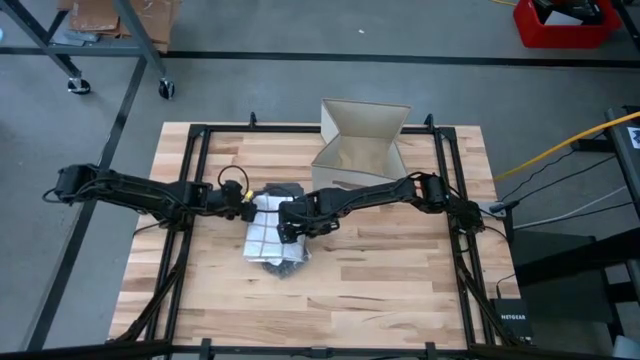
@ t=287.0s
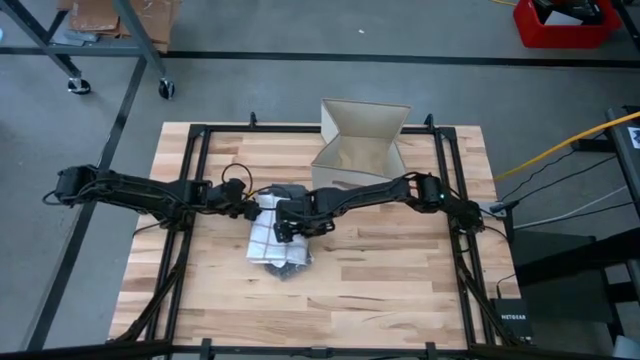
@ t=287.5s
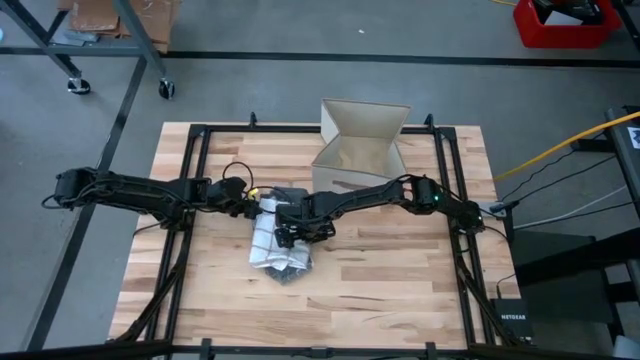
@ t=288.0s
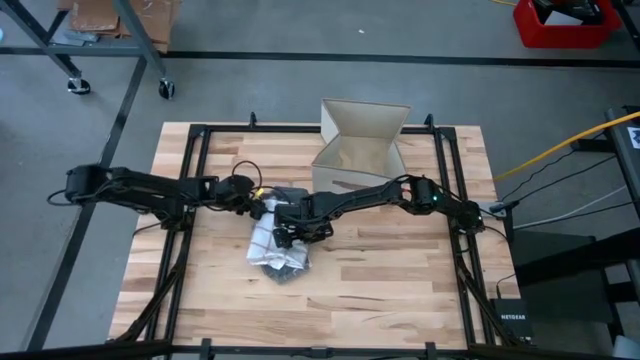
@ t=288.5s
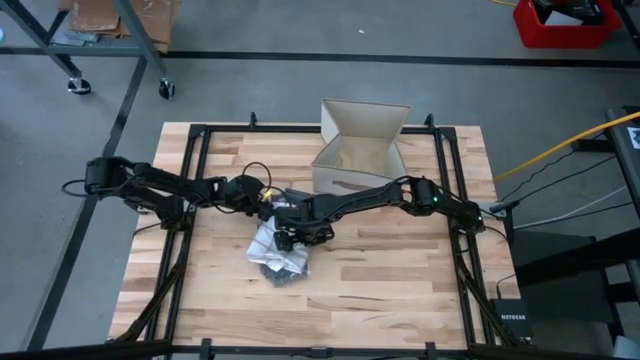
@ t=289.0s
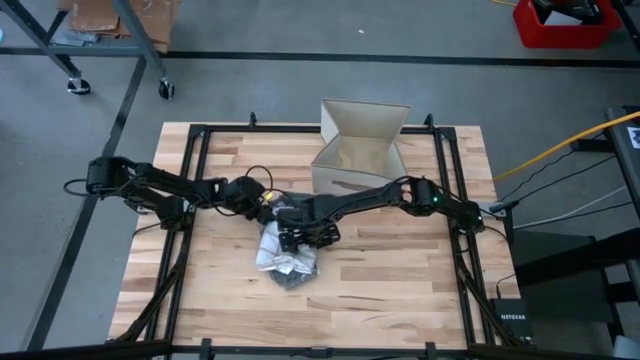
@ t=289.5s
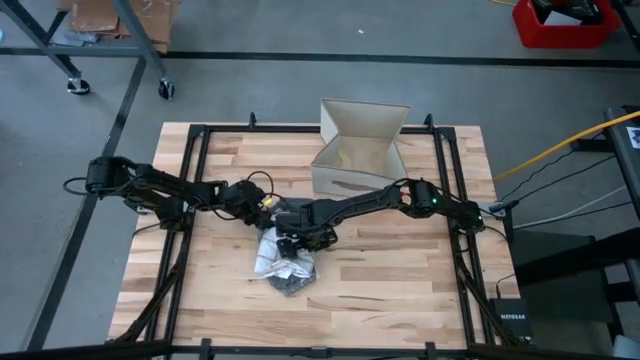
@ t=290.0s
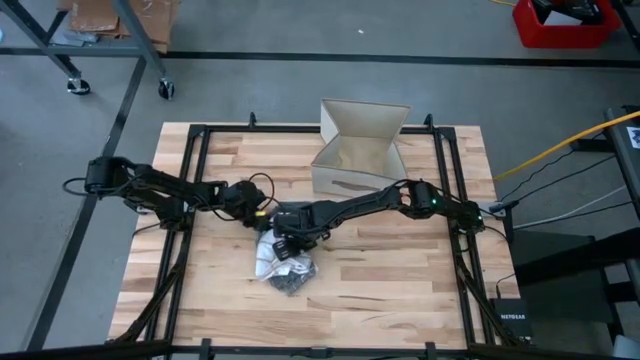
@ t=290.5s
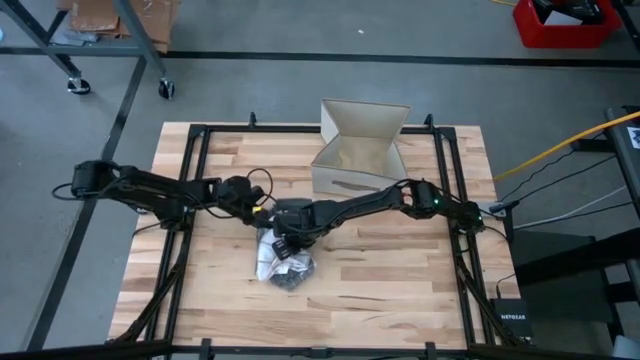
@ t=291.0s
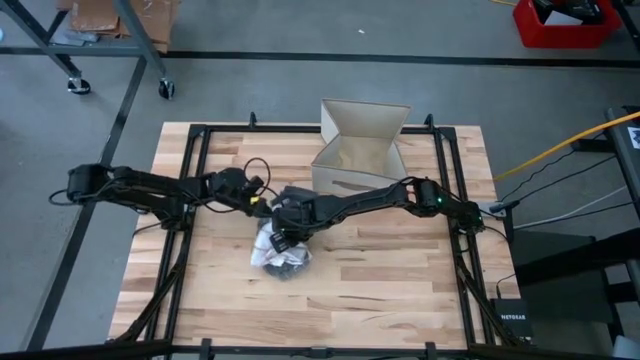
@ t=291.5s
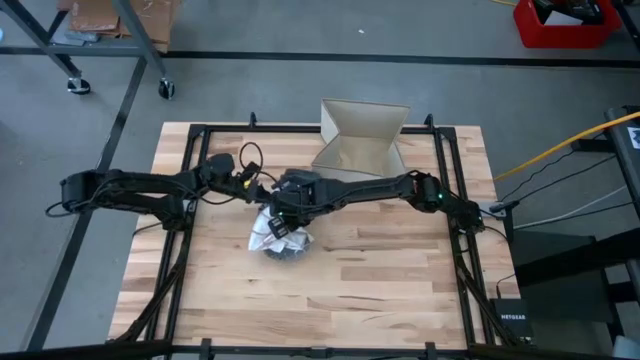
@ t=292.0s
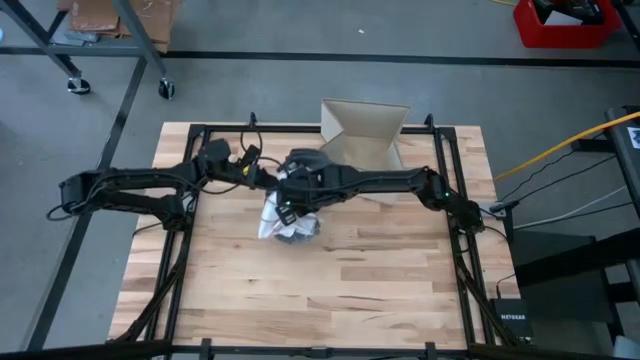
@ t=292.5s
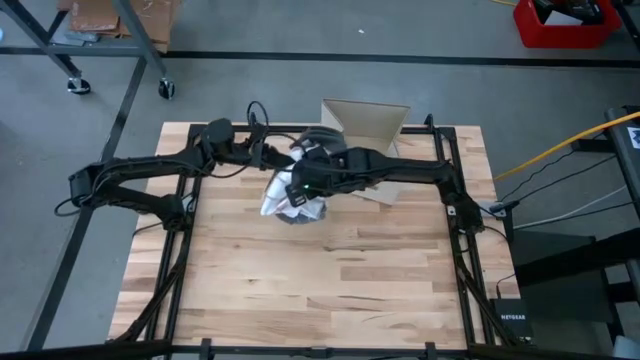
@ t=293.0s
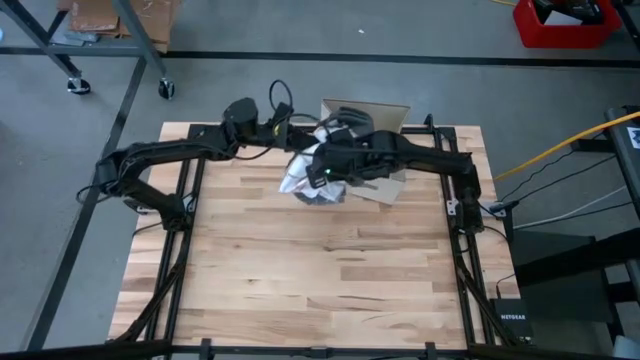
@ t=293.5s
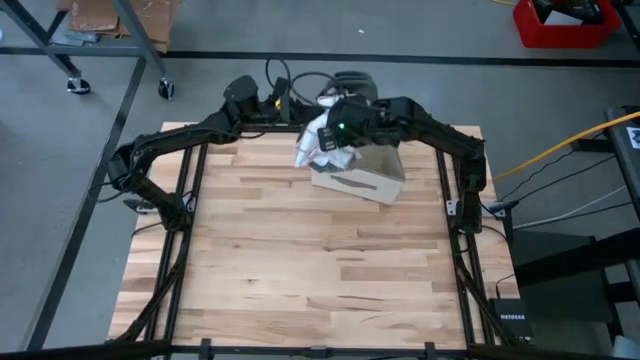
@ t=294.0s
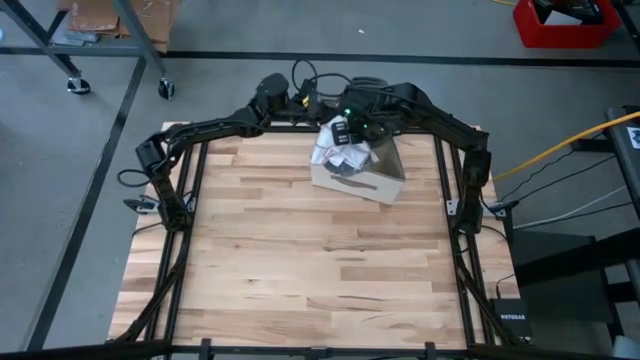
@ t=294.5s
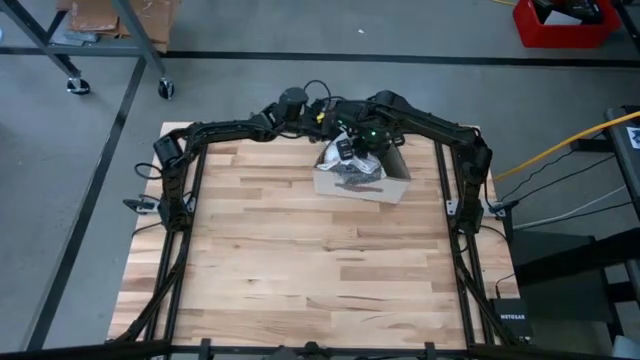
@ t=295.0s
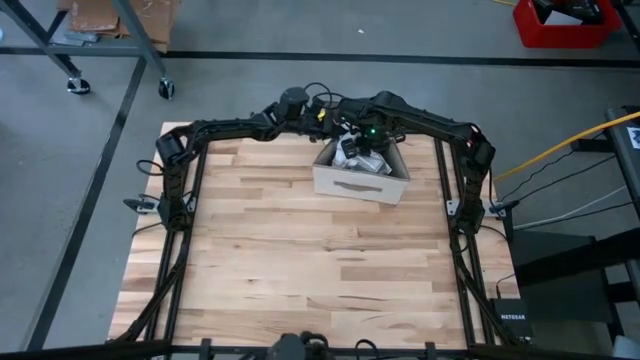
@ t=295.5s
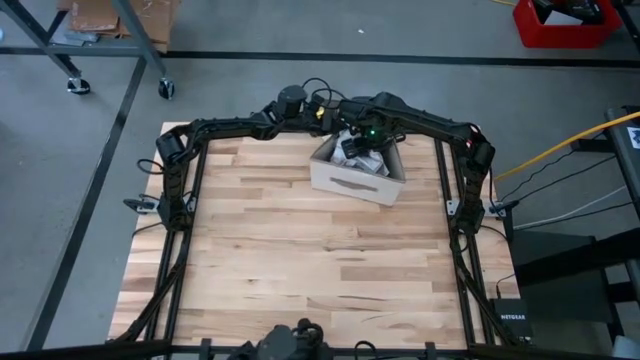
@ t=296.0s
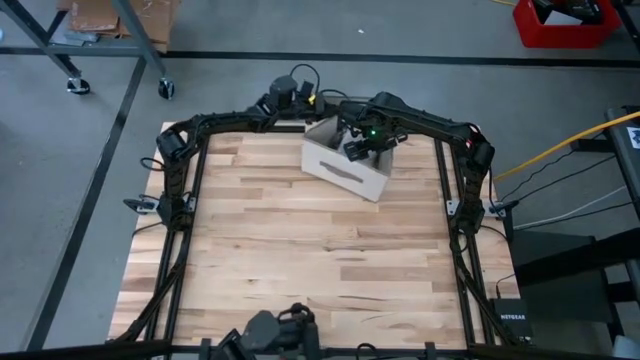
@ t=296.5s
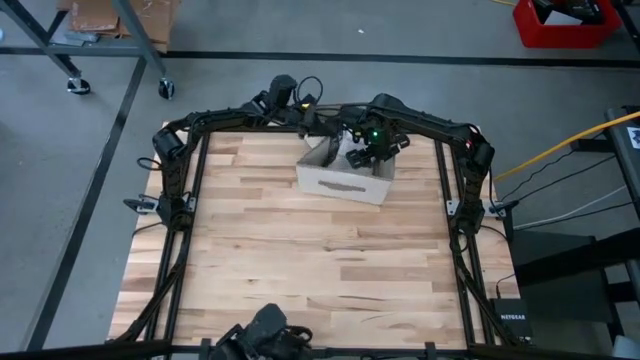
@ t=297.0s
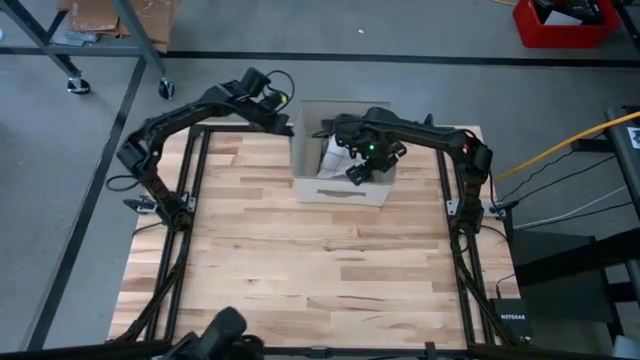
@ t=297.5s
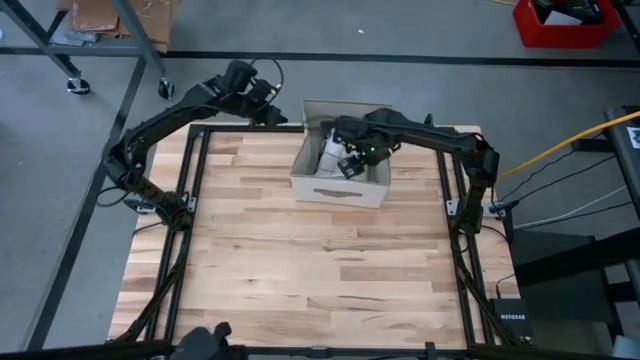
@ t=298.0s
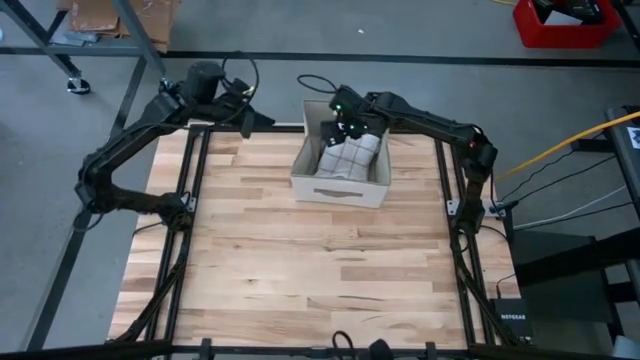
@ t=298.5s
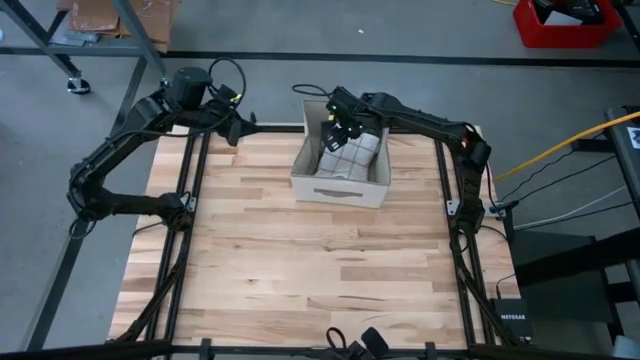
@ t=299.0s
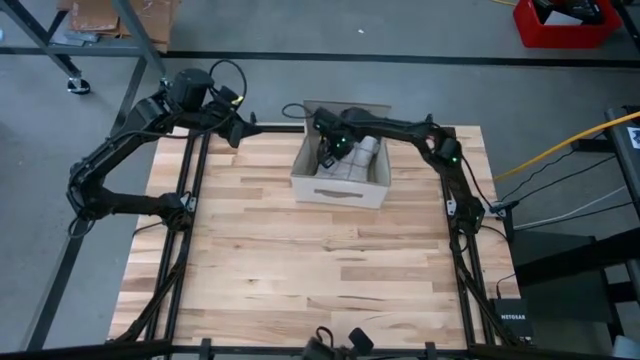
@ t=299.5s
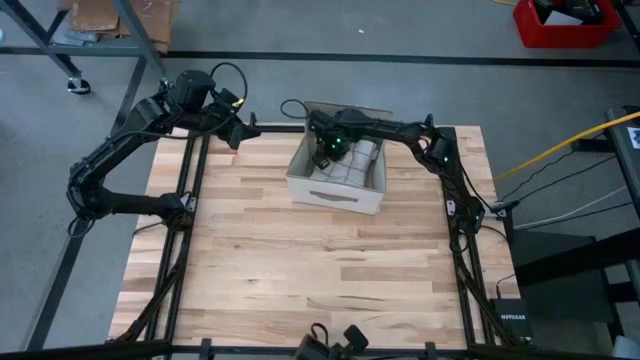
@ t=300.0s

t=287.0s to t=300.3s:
Task: Fold towel
Put the stacked towels into the white laundry organizer

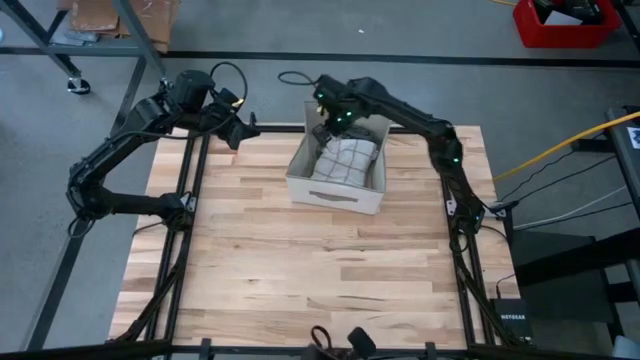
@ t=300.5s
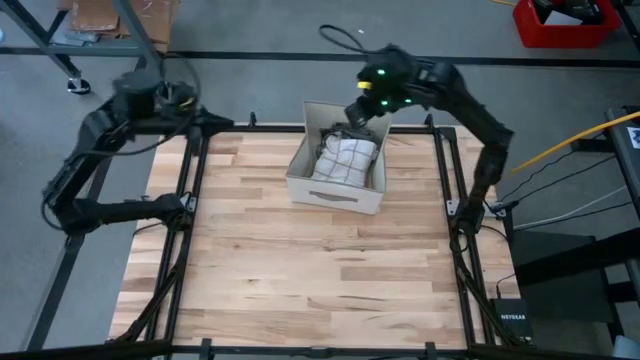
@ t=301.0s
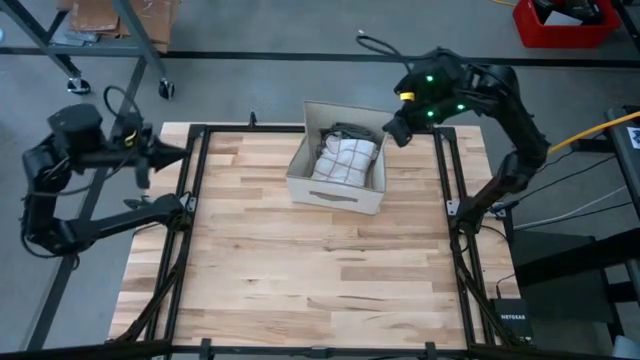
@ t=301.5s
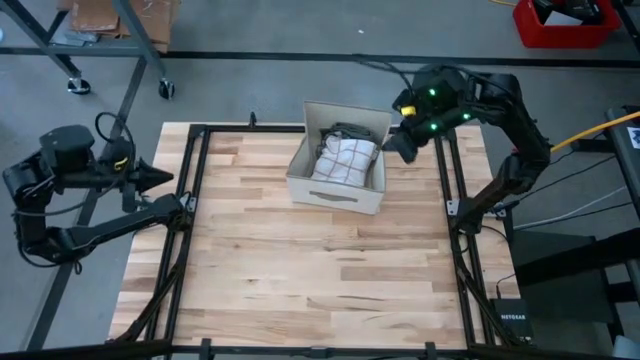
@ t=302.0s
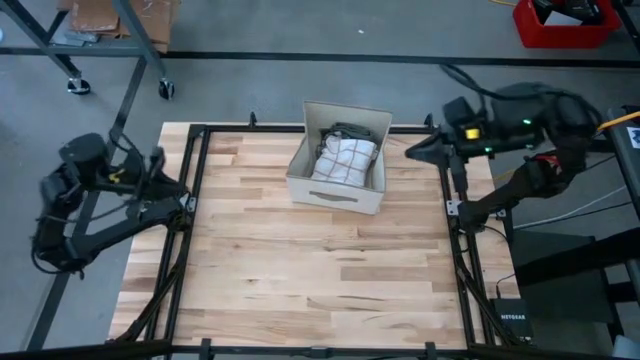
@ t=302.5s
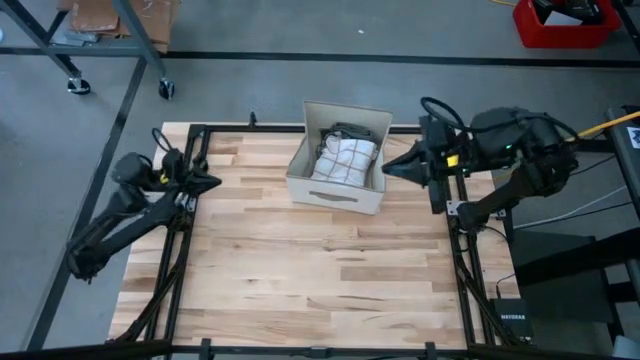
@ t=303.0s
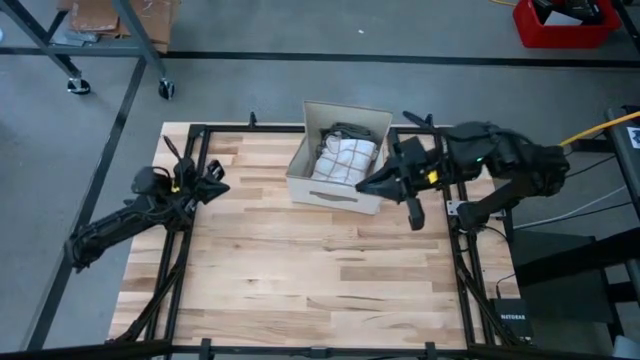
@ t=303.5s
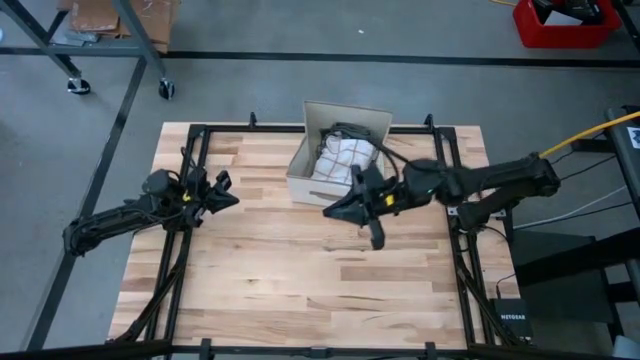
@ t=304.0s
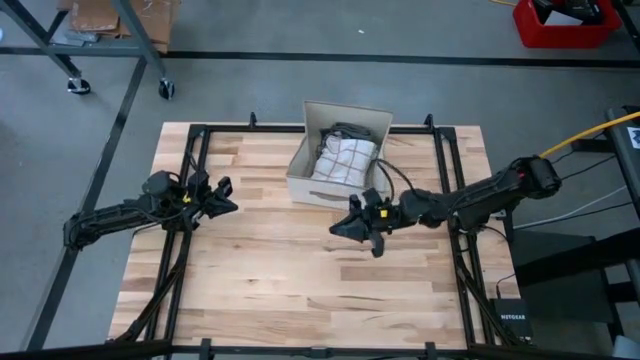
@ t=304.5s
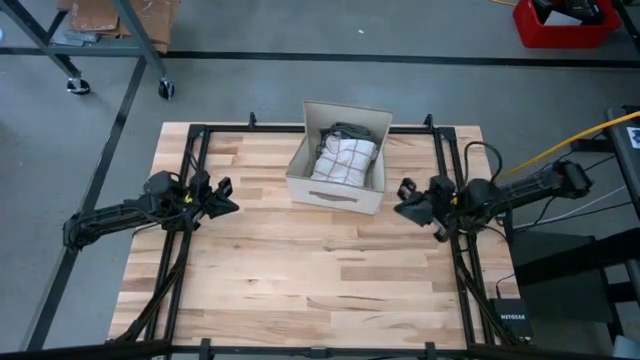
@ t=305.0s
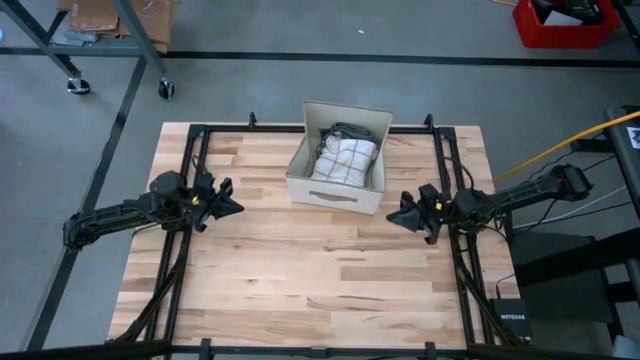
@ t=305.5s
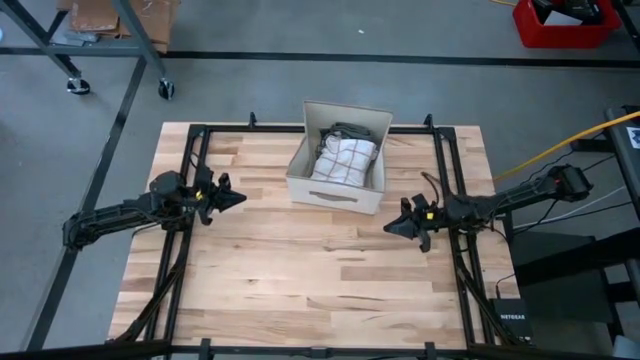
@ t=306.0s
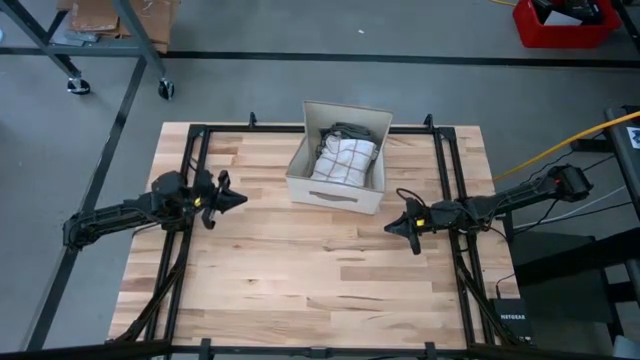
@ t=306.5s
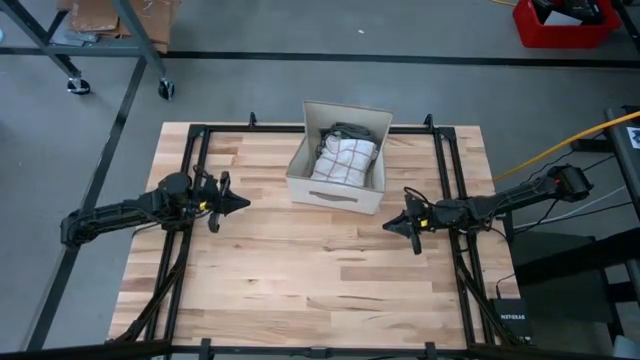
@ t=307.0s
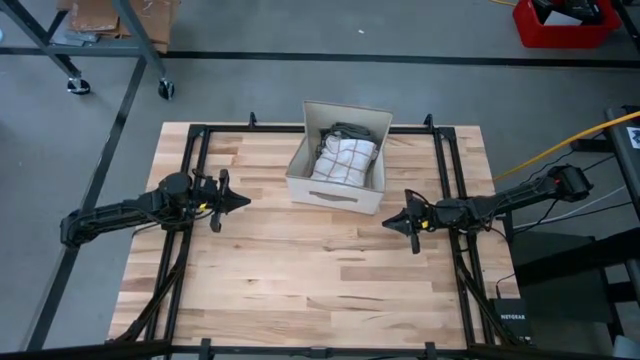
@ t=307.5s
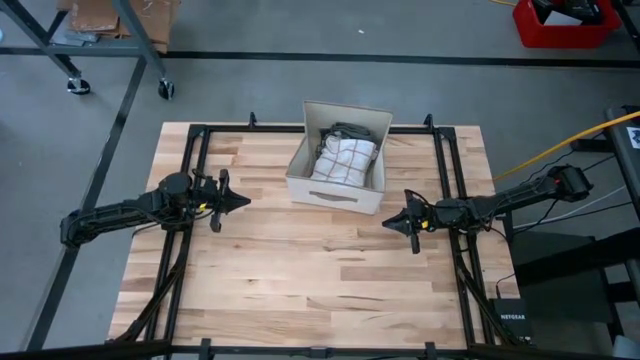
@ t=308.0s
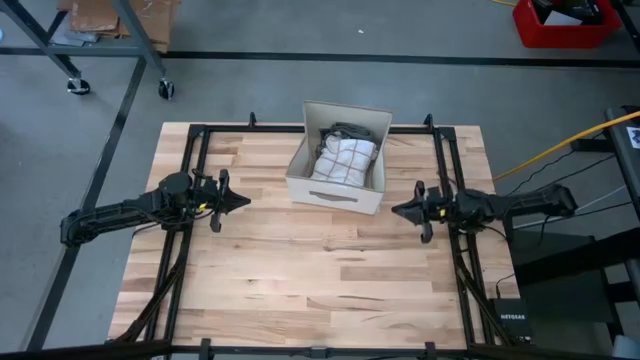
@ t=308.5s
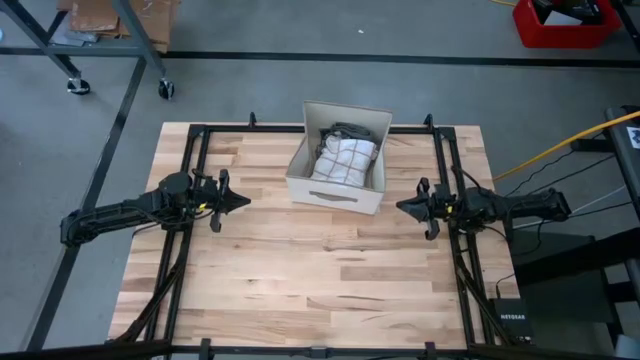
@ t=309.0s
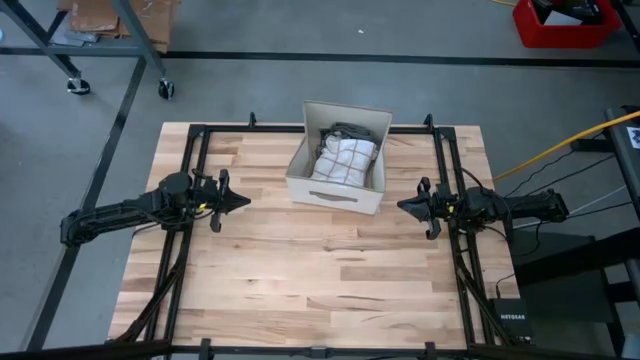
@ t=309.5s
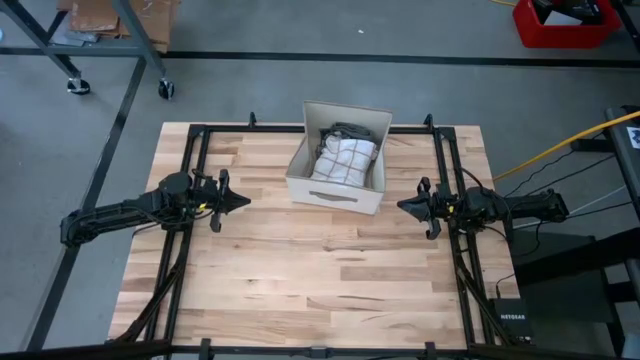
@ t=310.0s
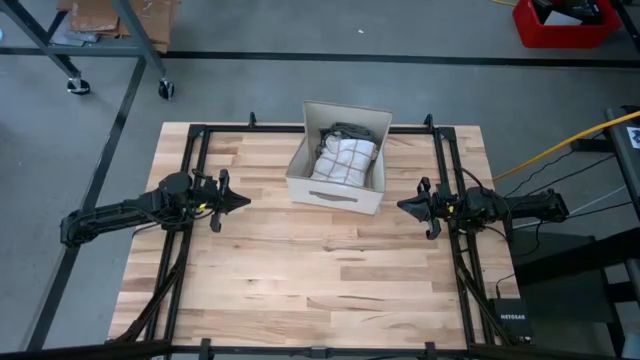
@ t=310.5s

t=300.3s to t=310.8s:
Return to Home Position
